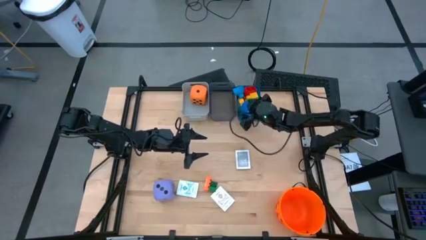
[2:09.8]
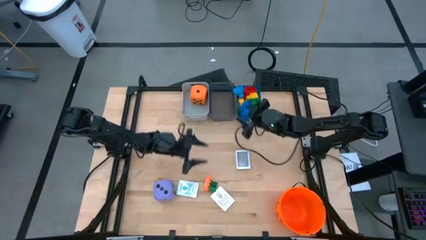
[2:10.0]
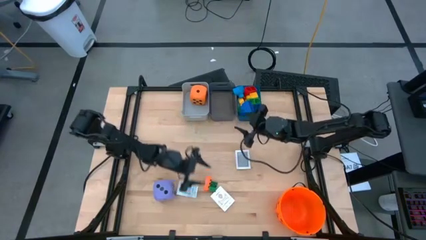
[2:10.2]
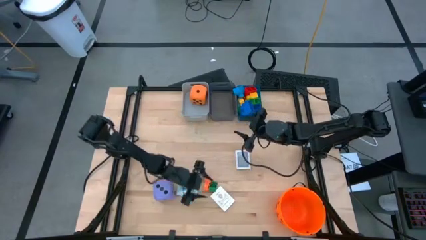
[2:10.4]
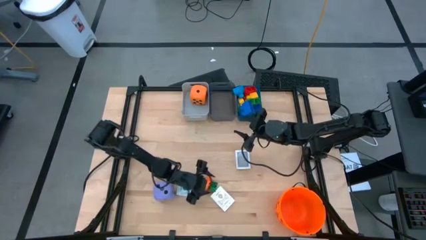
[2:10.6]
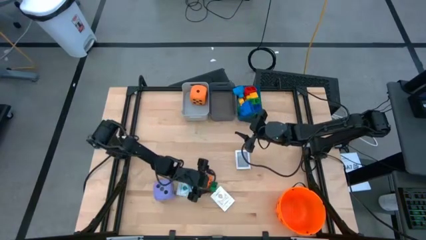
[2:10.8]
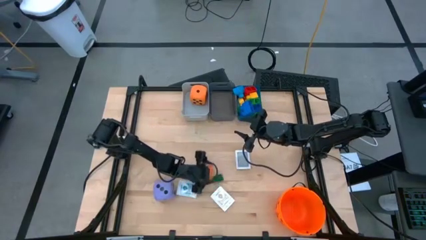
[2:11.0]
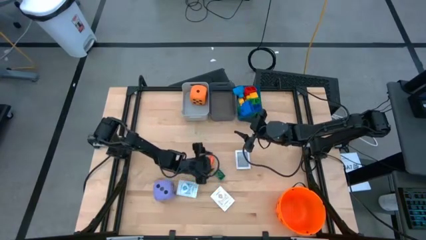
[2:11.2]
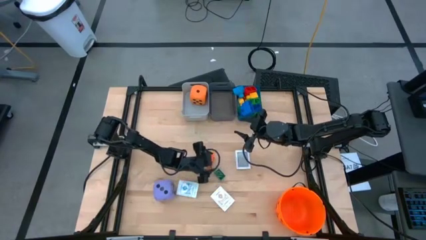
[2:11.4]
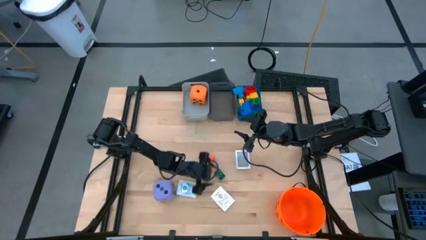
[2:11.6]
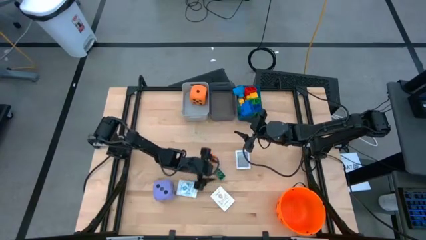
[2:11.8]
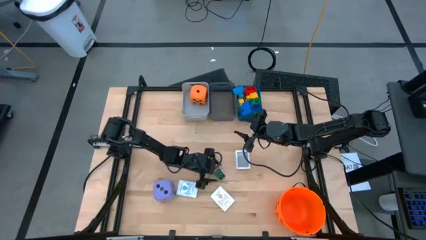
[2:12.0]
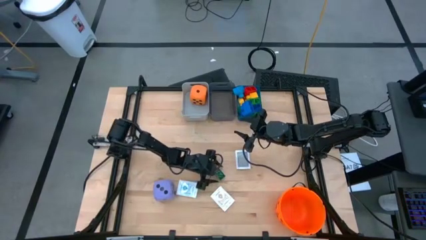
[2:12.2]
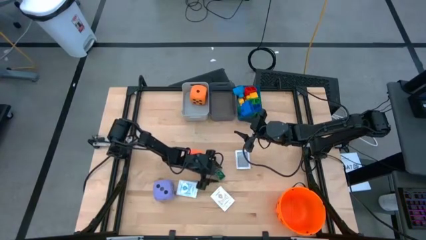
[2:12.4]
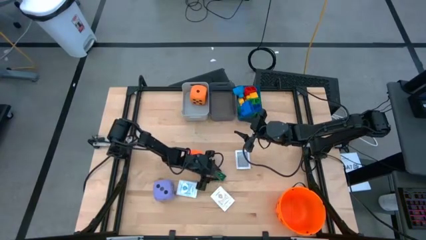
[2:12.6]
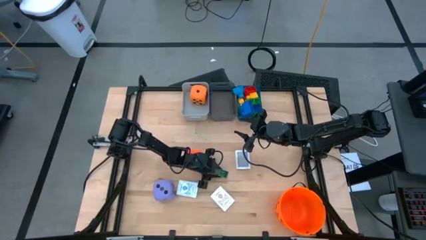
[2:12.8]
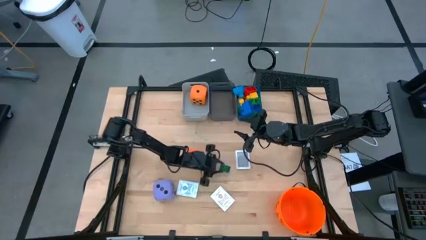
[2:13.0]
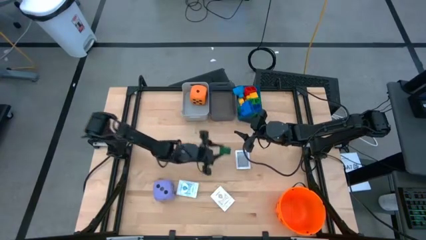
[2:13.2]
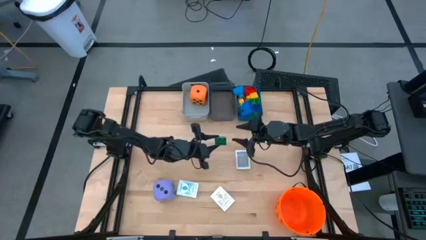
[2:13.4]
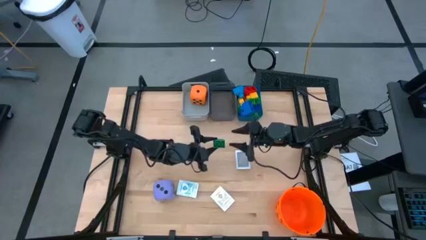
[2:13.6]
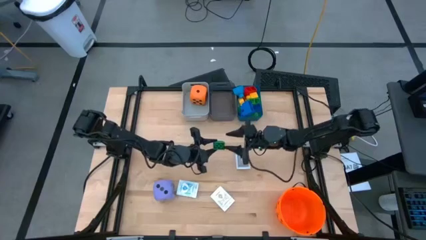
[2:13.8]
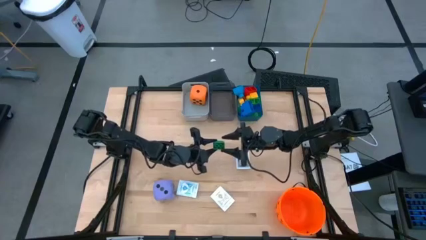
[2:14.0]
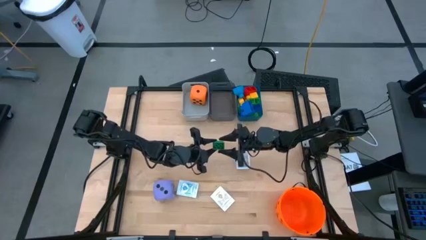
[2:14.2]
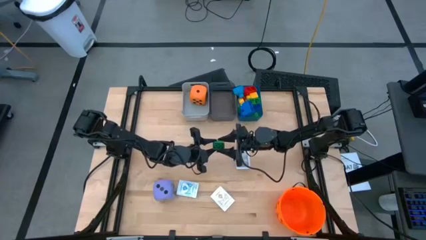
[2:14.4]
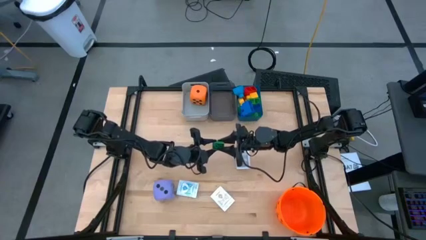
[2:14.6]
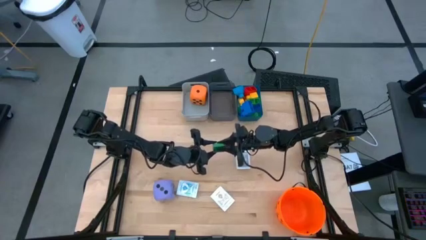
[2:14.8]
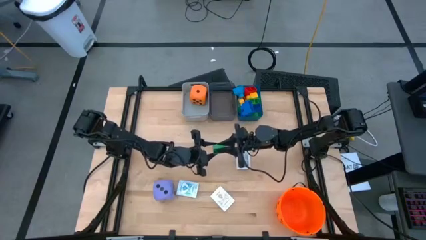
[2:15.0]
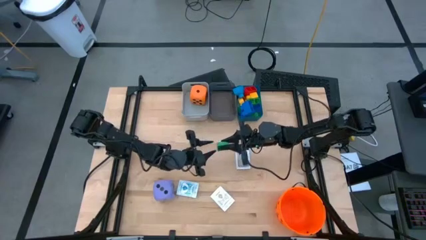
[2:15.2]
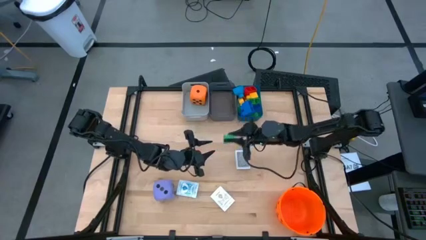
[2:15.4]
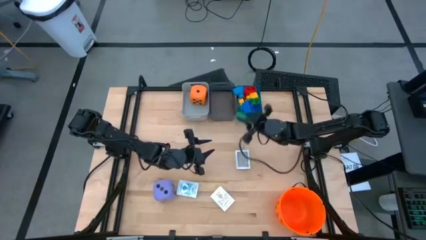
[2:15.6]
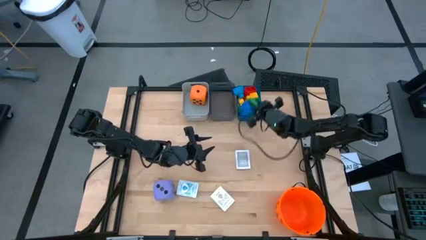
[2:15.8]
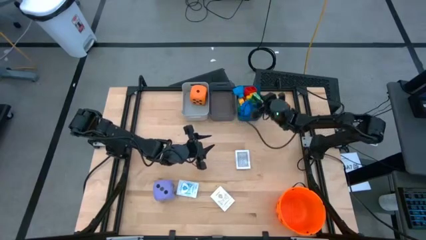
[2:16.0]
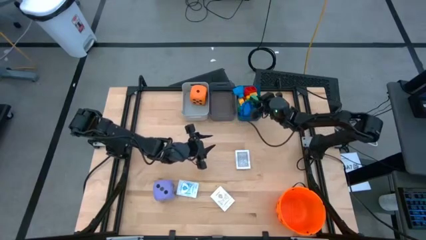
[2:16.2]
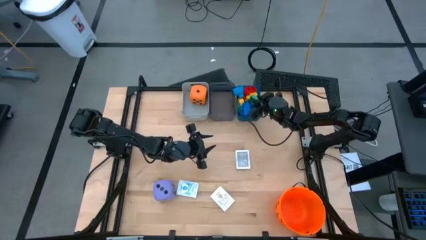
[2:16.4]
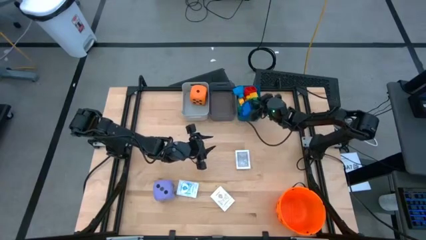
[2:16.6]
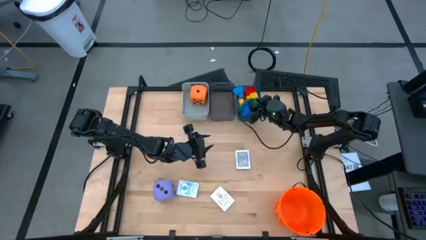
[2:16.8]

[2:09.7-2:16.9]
Task: Pick & Place Toys
Put the green game piece into the blue bin

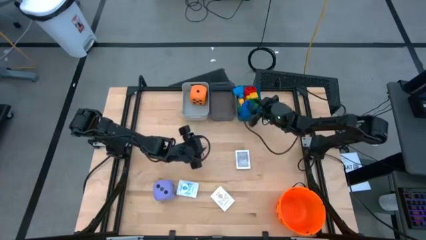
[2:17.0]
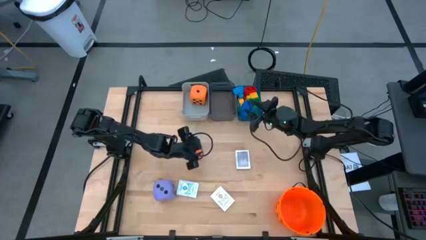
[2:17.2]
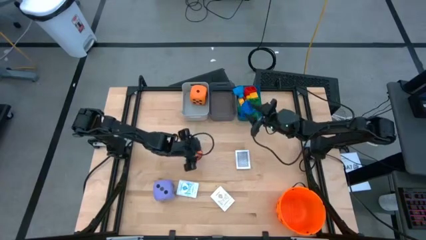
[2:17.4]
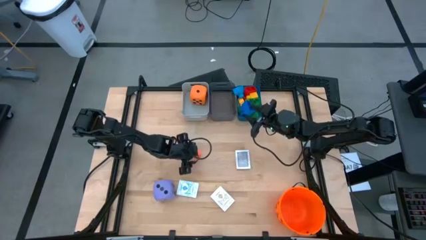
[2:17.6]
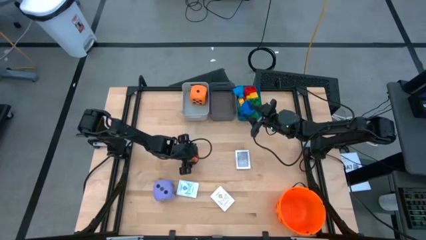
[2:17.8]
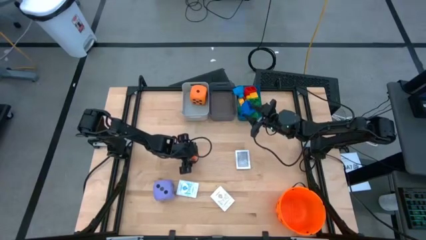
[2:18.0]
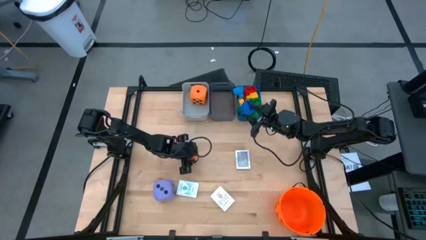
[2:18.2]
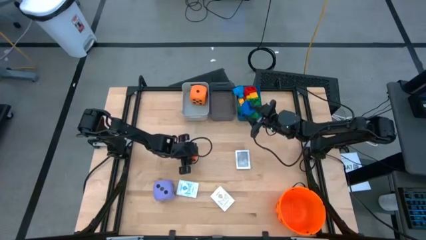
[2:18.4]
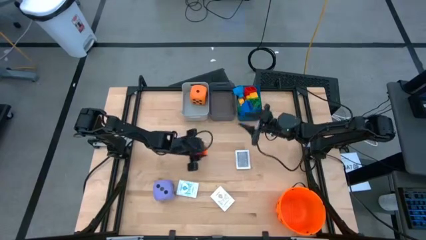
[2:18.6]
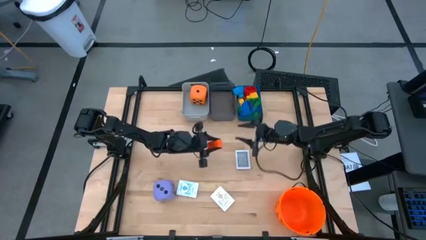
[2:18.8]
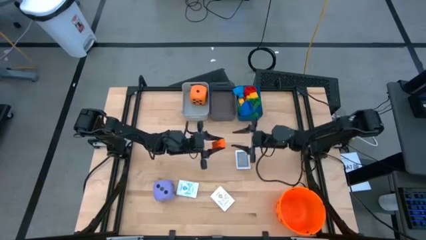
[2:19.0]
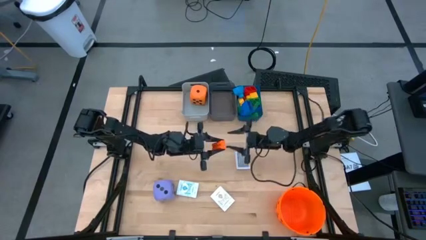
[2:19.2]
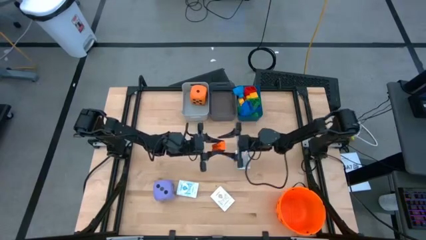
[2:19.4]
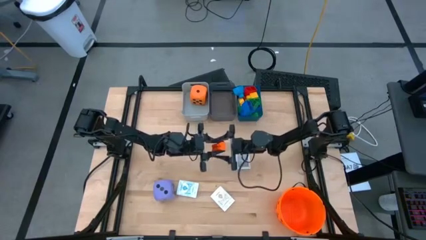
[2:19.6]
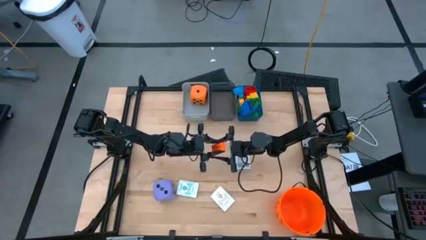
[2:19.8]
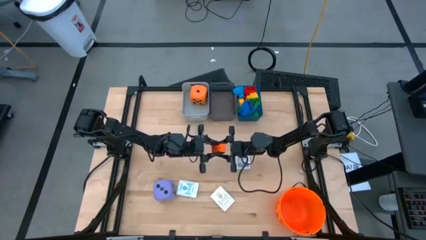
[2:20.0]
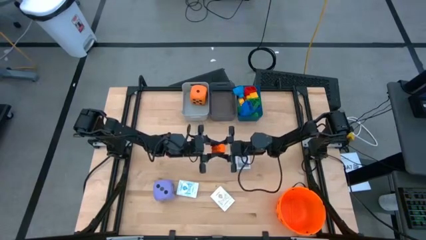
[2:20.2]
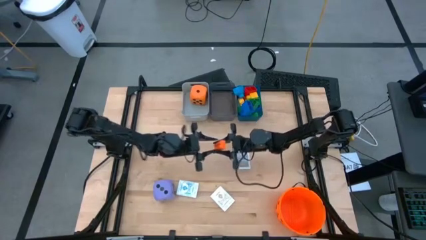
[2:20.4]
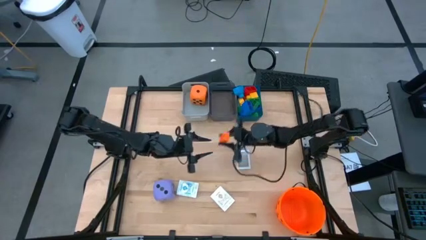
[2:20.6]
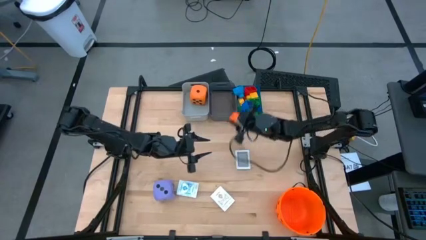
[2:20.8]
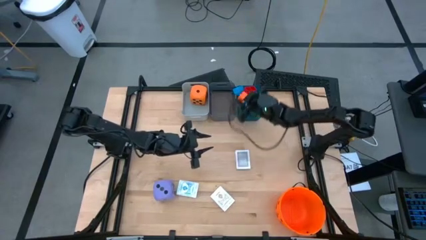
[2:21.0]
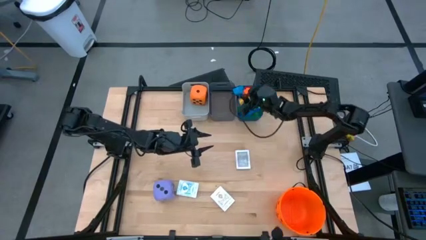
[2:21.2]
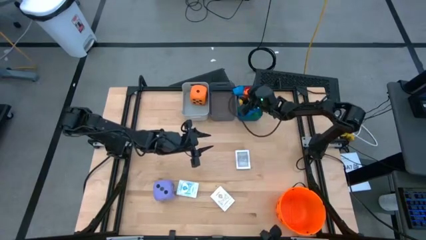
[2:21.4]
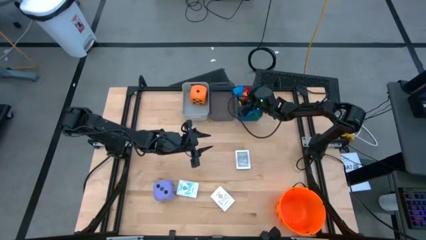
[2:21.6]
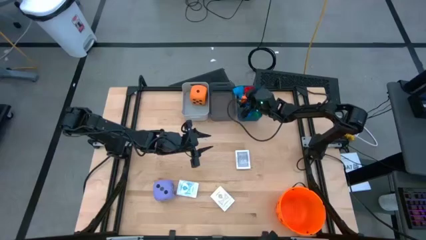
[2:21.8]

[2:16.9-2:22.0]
Put the orange game piece into the blue bin

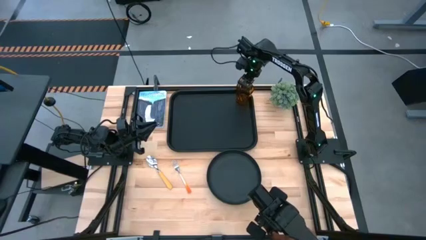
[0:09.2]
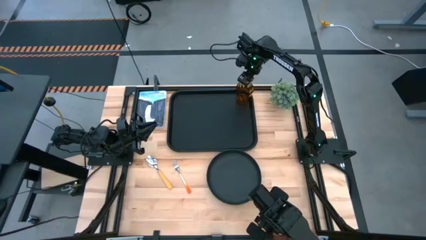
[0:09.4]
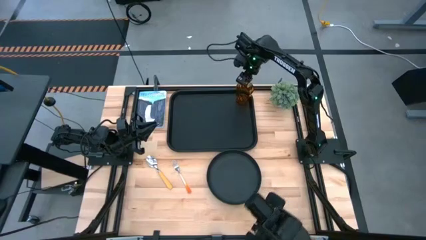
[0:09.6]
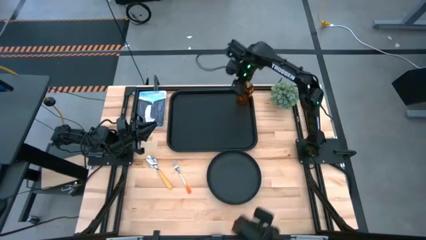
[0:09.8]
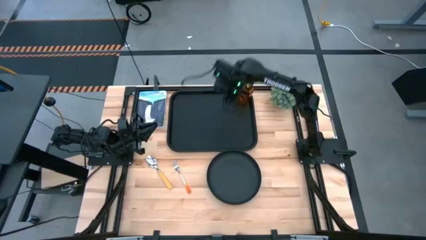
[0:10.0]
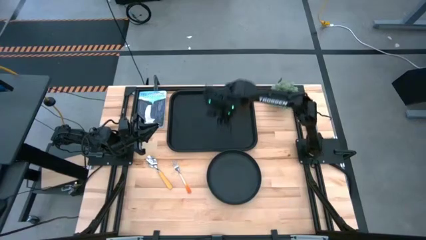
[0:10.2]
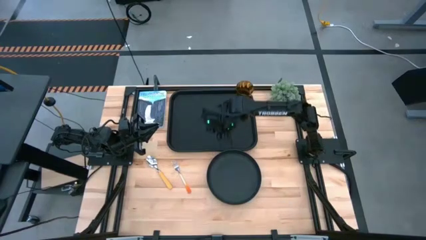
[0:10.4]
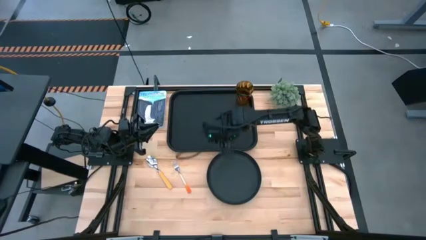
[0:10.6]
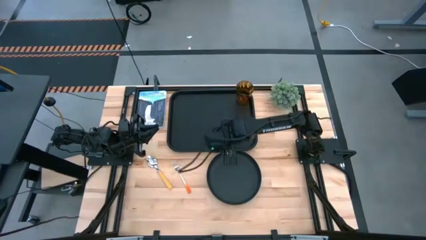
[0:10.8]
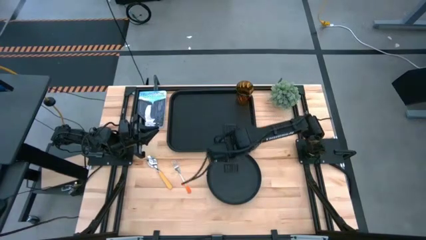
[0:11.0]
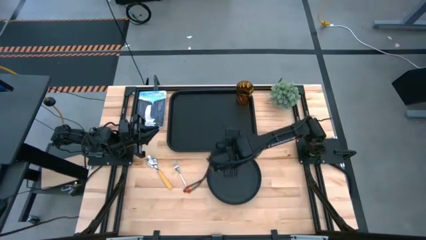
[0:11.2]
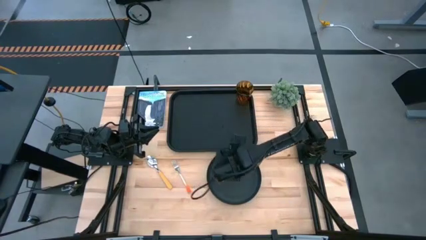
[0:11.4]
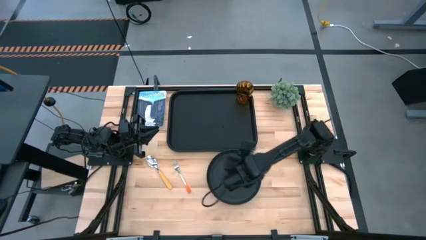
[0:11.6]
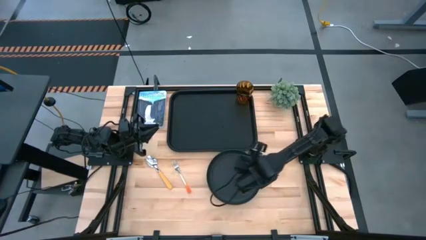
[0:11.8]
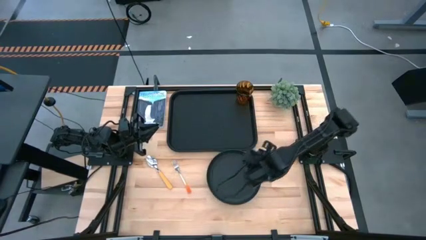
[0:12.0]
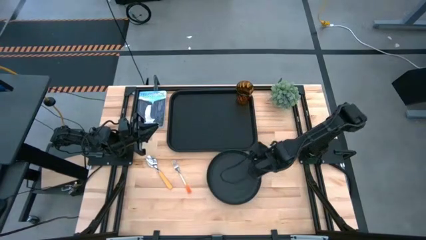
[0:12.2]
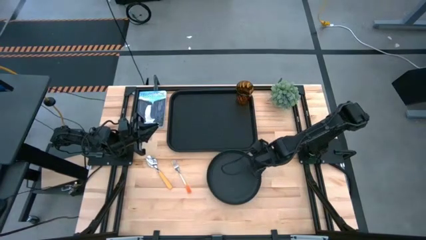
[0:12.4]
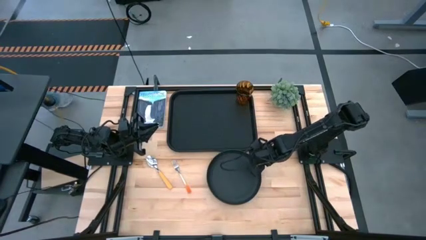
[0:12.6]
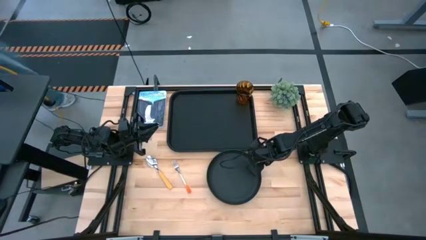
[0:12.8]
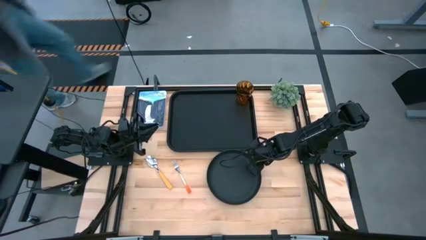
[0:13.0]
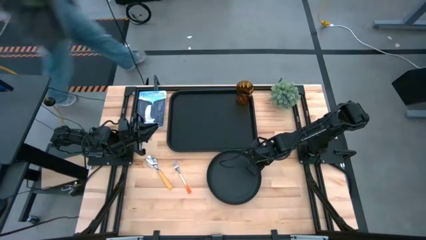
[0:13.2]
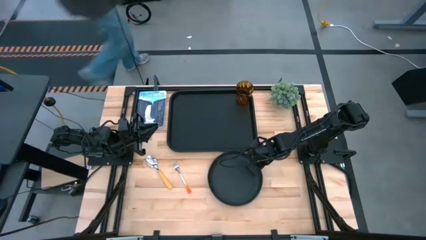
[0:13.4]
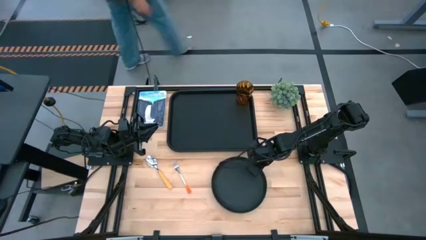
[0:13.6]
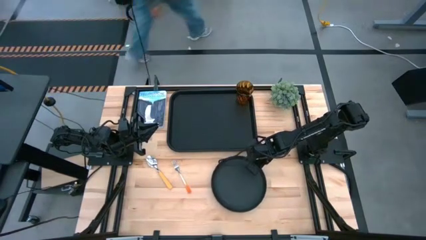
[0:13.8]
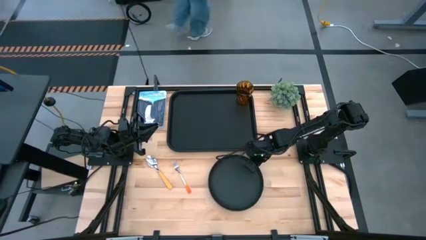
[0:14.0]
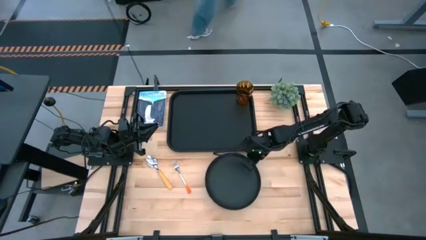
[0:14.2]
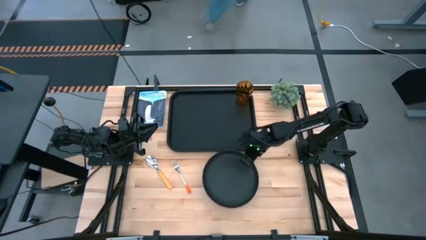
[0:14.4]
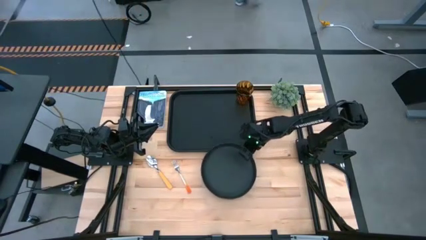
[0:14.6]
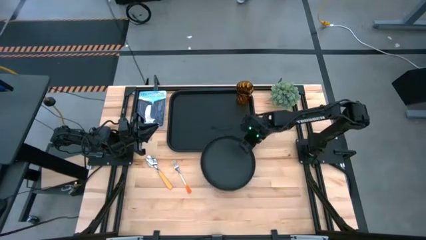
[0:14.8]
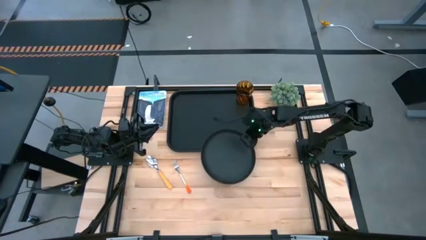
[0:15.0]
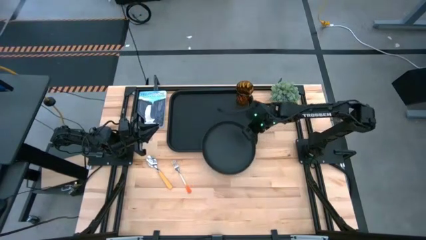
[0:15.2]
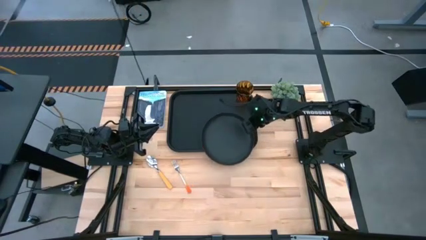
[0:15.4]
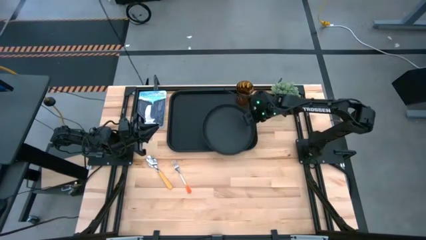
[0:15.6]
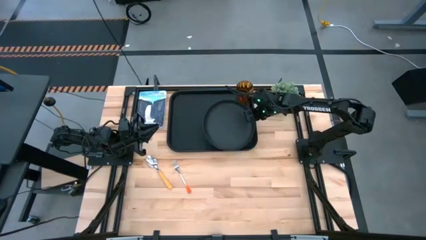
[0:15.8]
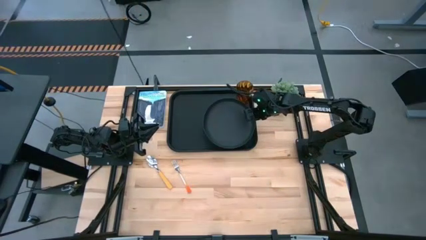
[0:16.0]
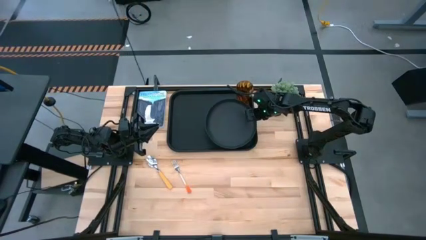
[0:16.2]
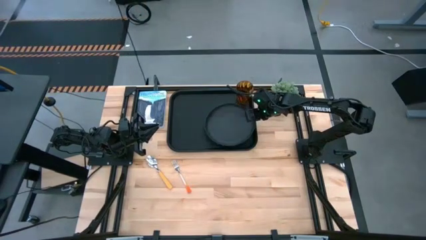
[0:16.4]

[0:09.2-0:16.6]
Task: Pick and place plate/cup/fork/spoon on tray
Put the black plate on the black tray
